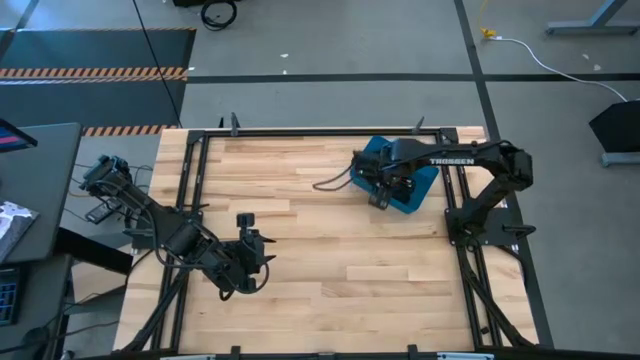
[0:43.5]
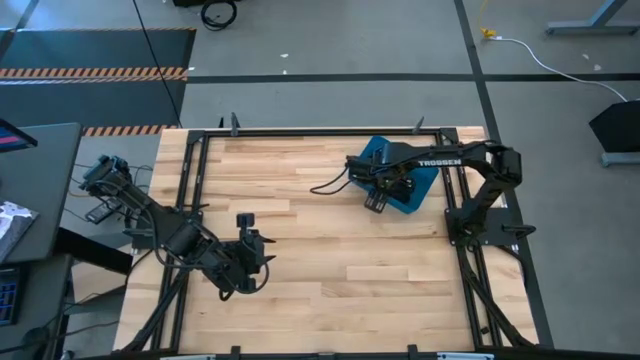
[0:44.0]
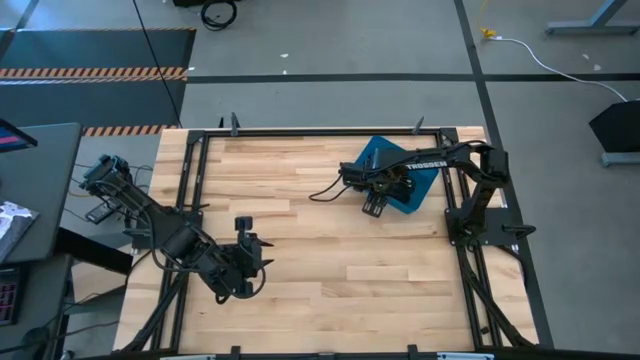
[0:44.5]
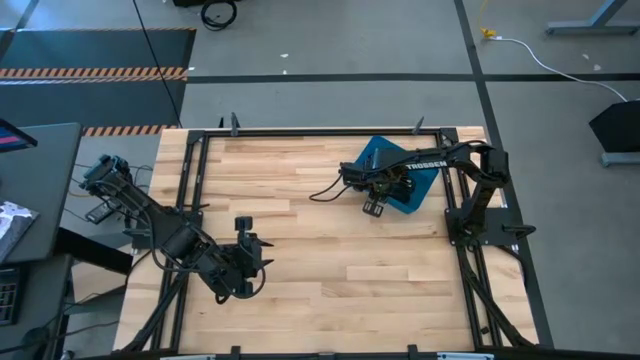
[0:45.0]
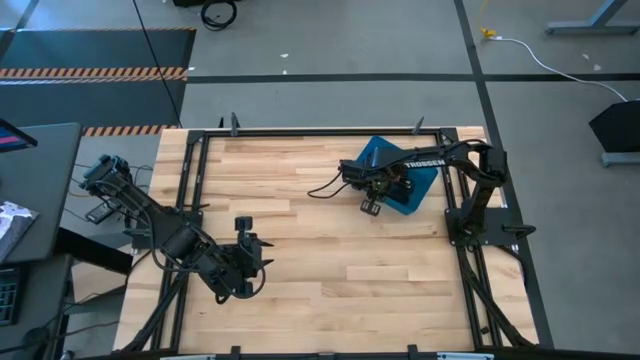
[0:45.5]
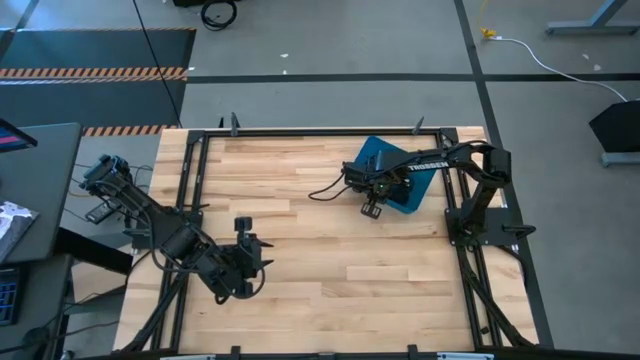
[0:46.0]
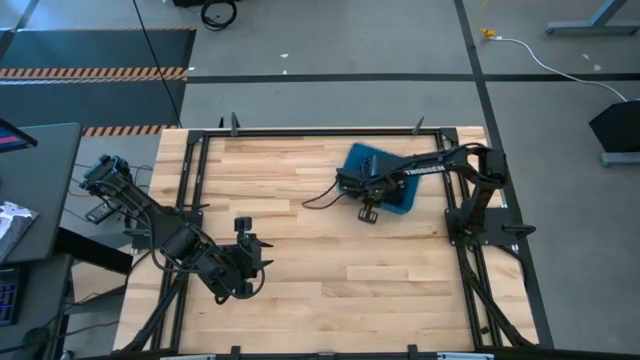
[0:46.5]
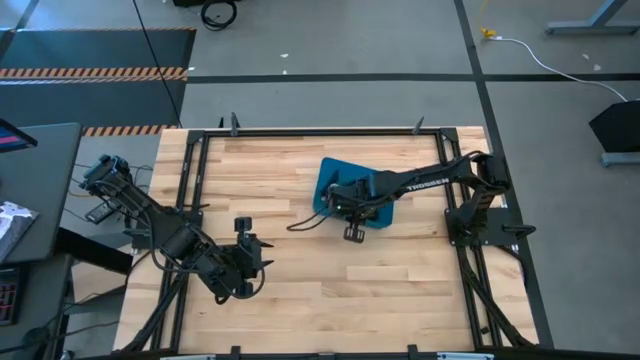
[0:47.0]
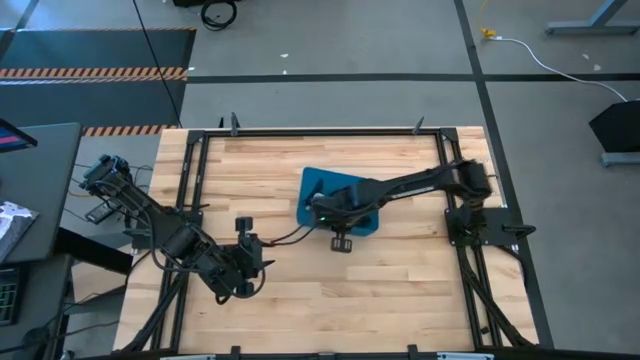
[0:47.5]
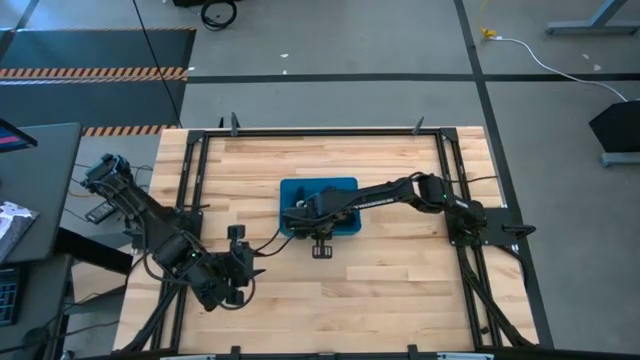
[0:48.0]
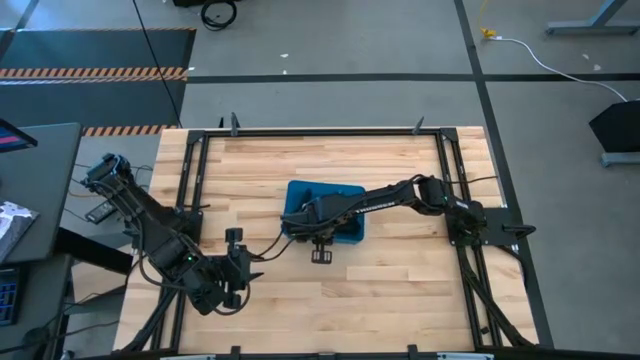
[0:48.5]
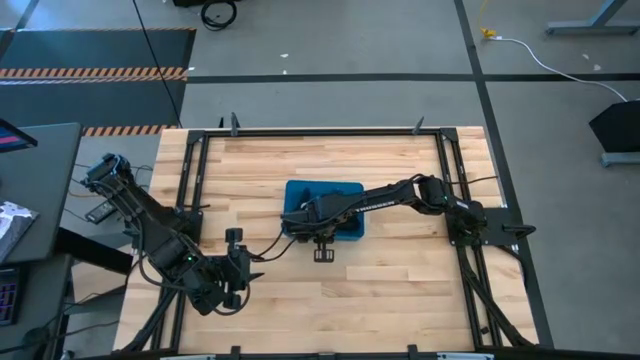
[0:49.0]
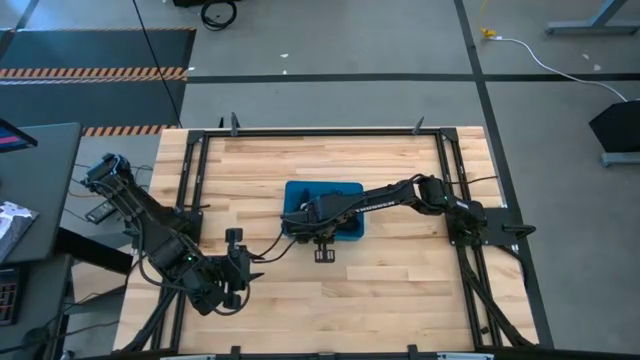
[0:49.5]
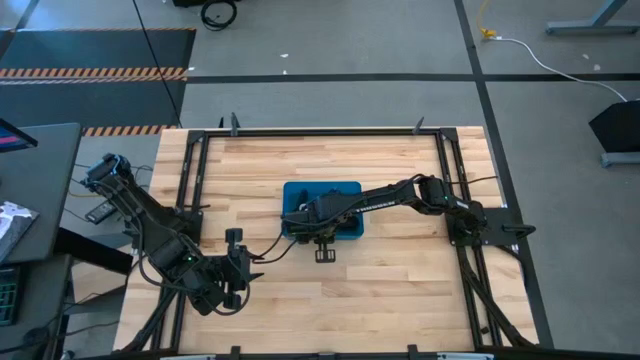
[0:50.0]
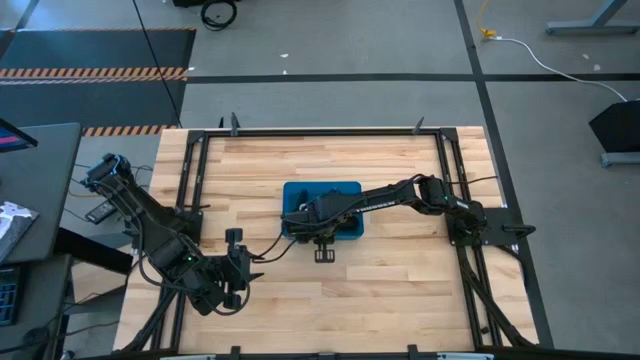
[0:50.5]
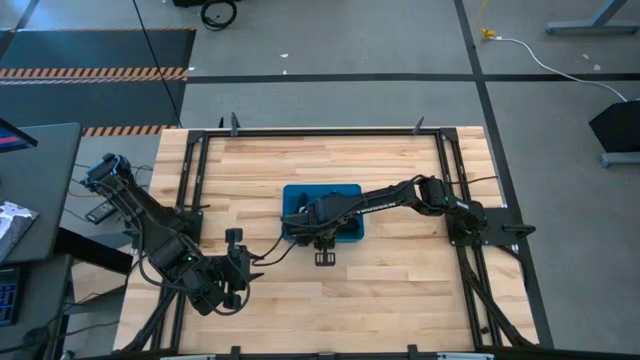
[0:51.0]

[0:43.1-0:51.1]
Task: Pick and place USB-C Cables
Move the blue bin to the center of the table

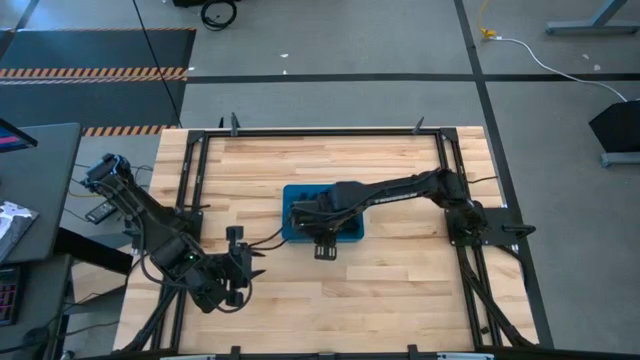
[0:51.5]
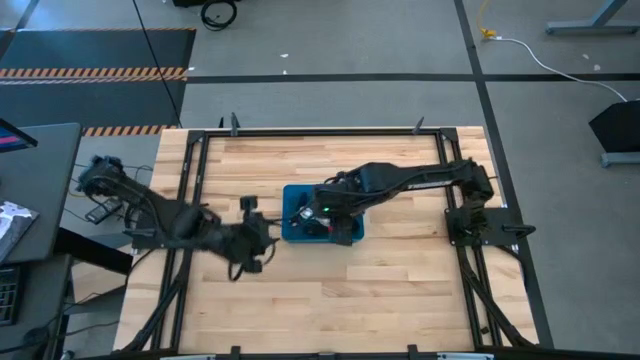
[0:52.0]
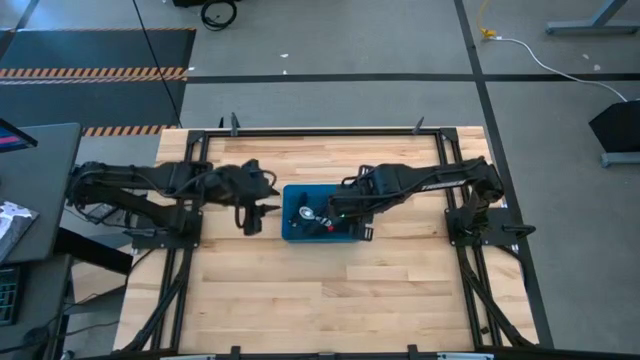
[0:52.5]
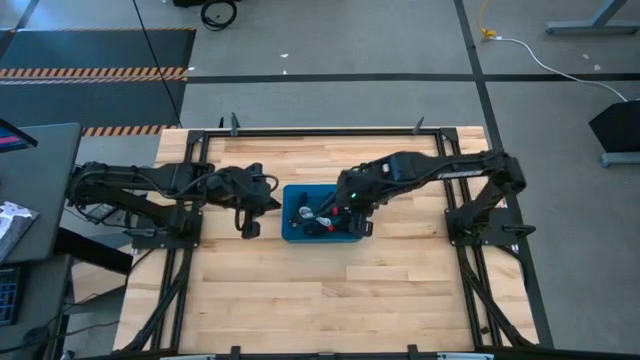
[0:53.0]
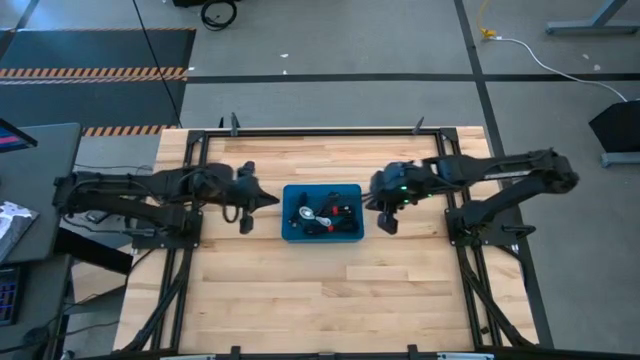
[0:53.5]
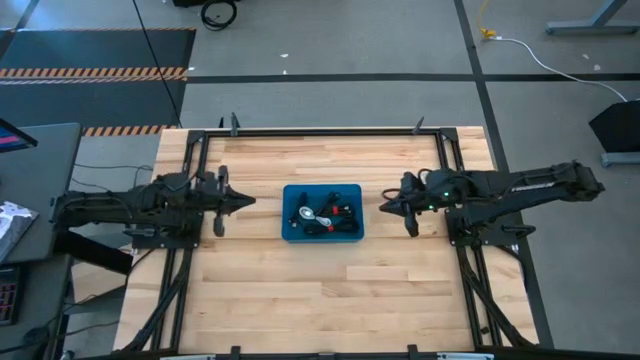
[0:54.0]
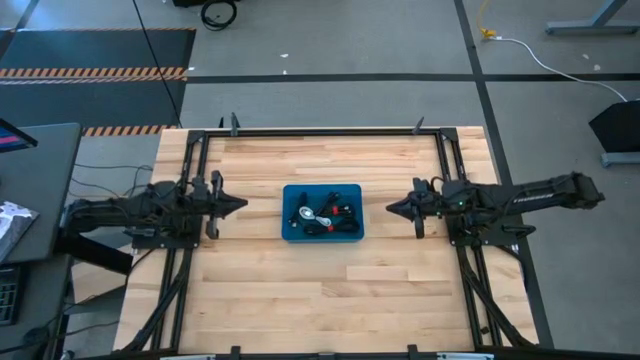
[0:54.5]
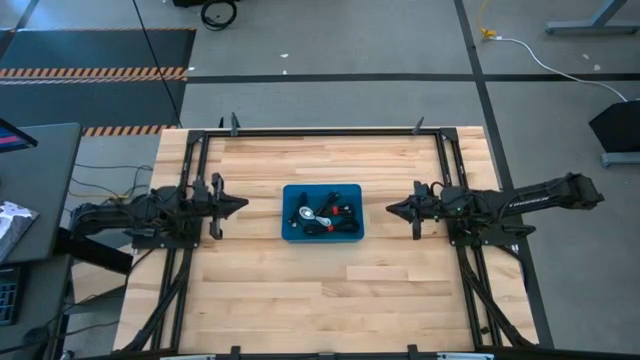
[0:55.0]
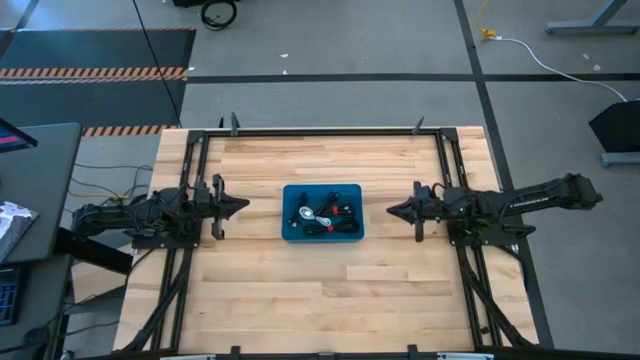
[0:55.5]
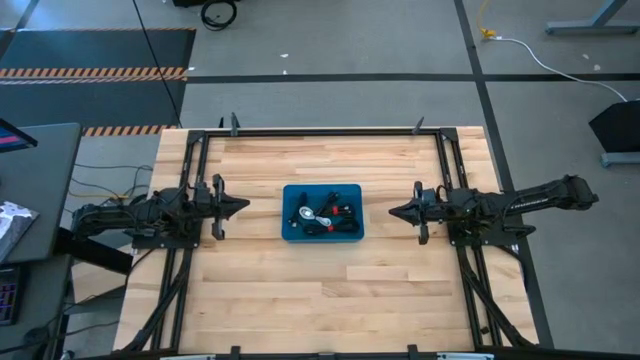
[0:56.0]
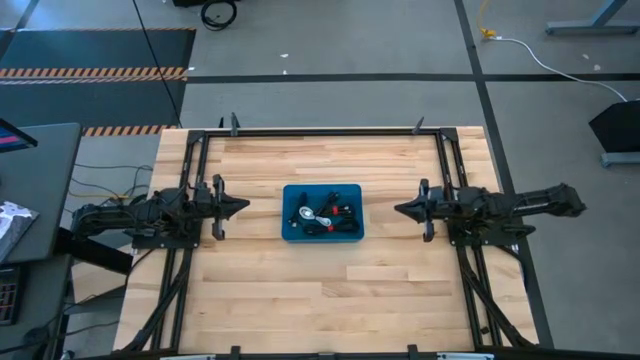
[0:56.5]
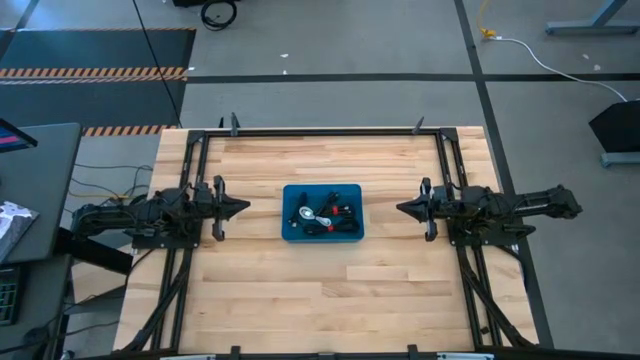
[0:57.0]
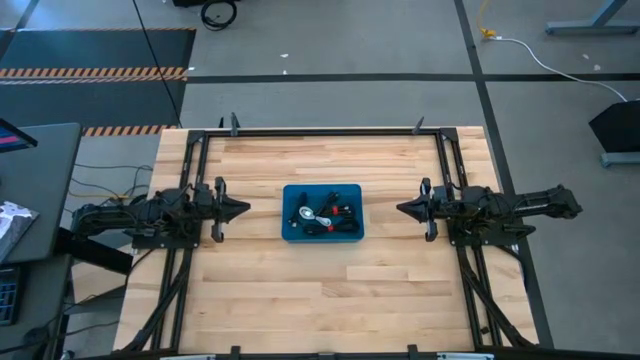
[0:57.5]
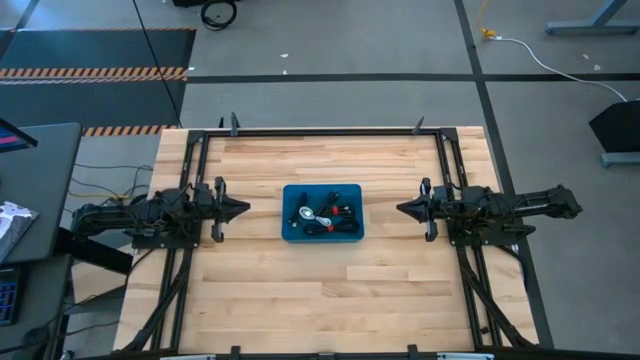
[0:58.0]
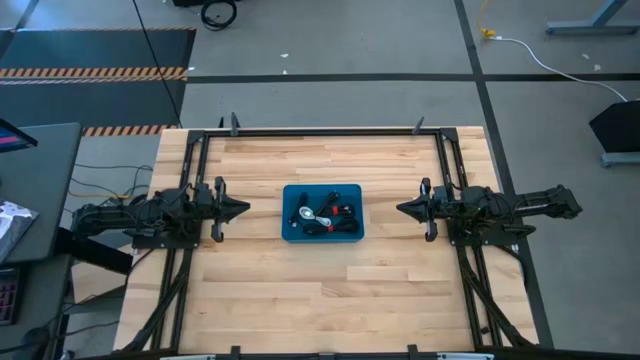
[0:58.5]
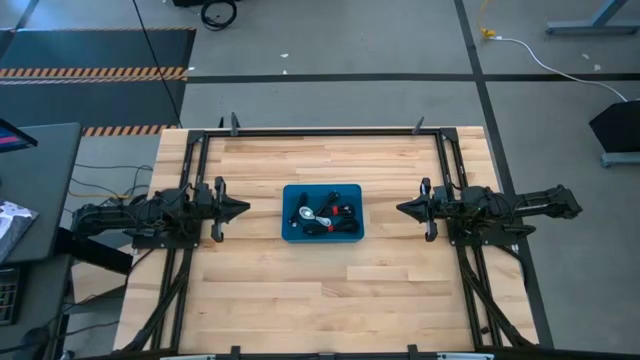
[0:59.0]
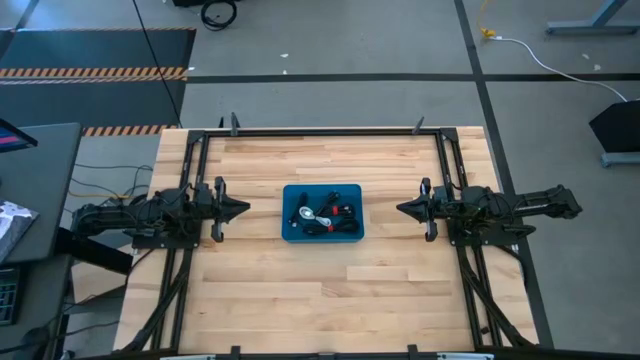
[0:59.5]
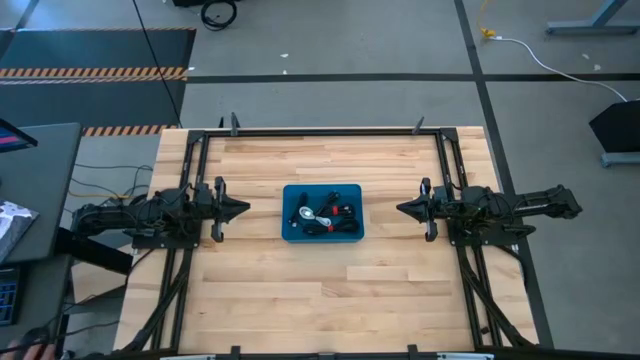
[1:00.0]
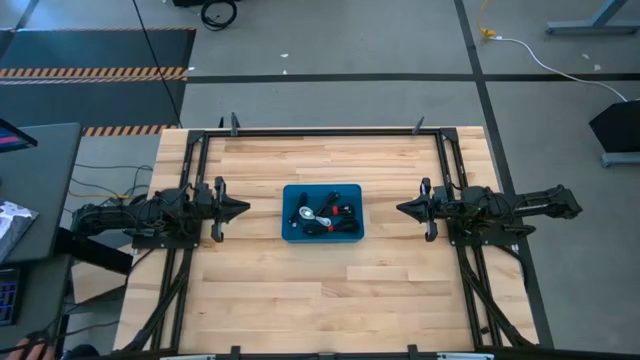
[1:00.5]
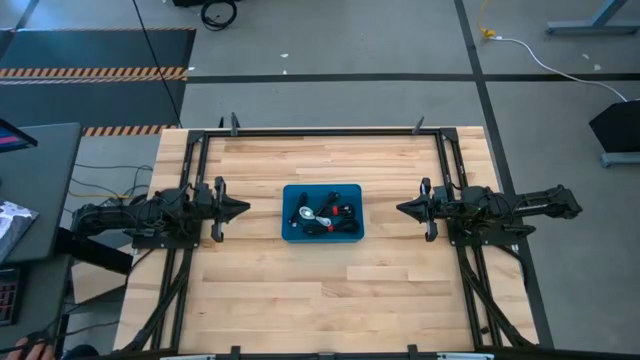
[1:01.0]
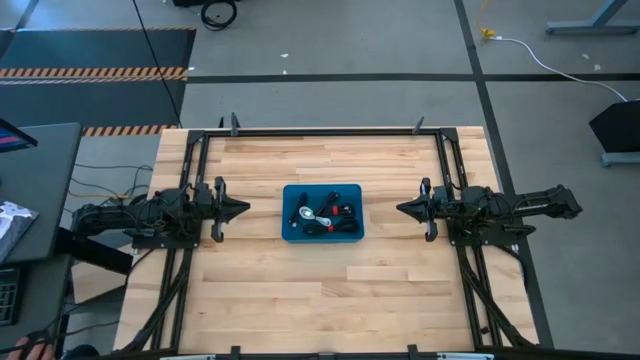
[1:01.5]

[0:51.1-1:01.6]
Return to Home Position

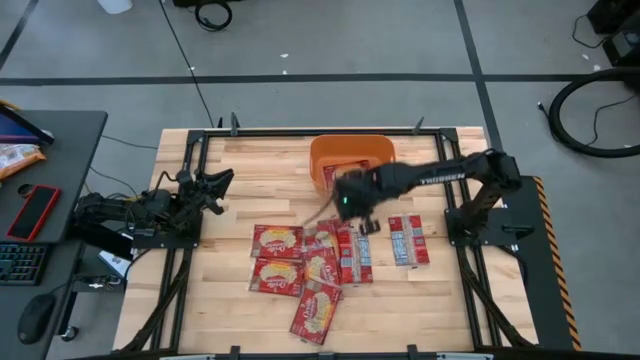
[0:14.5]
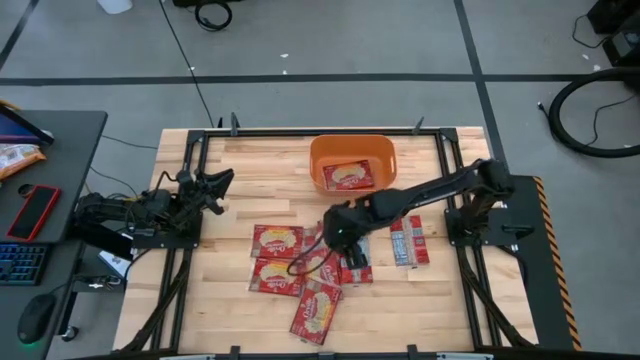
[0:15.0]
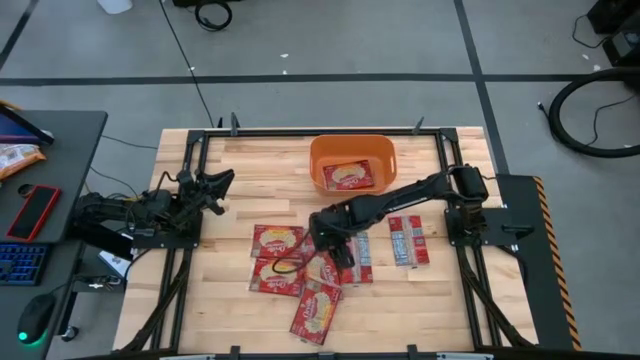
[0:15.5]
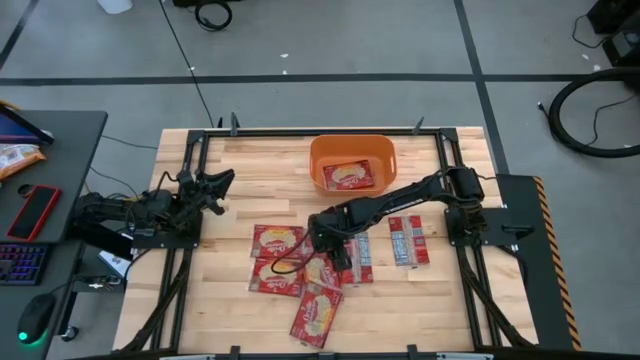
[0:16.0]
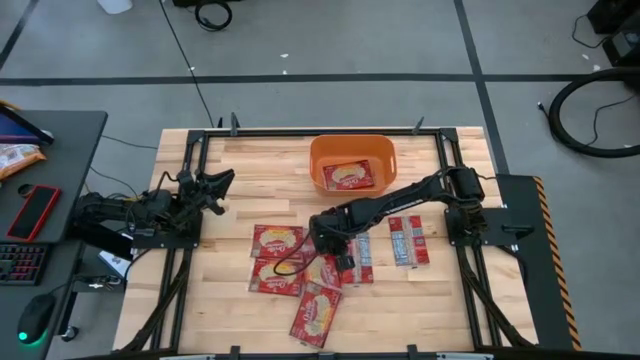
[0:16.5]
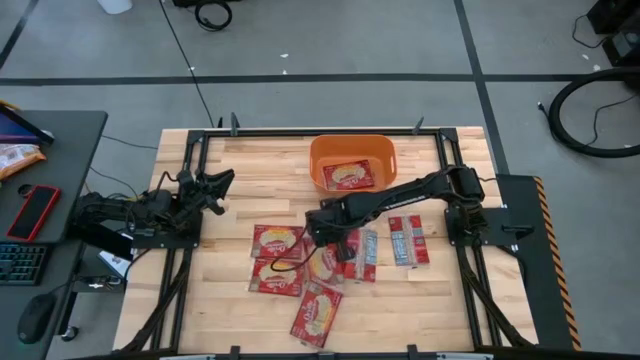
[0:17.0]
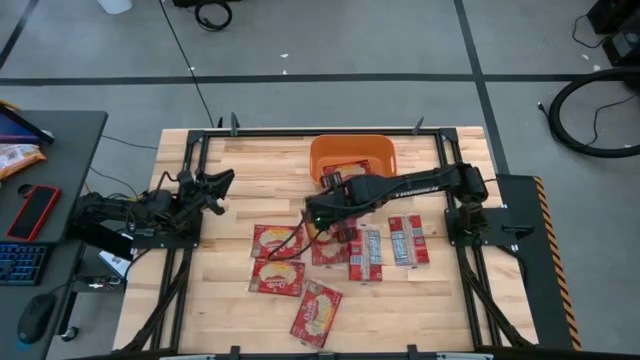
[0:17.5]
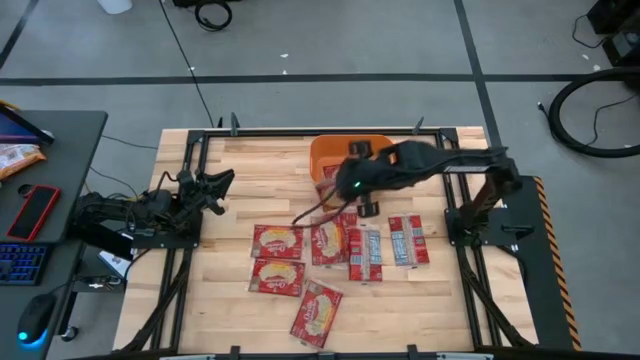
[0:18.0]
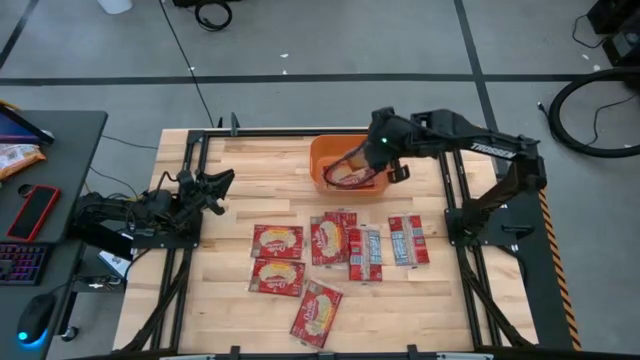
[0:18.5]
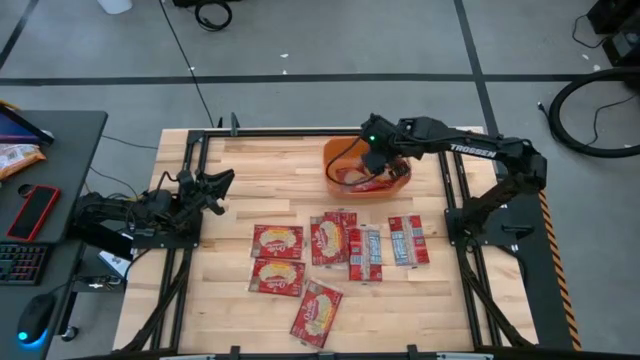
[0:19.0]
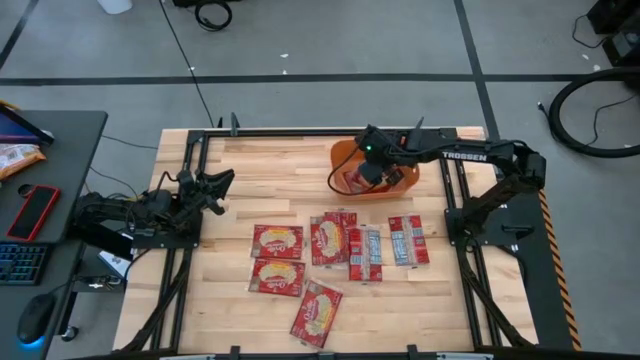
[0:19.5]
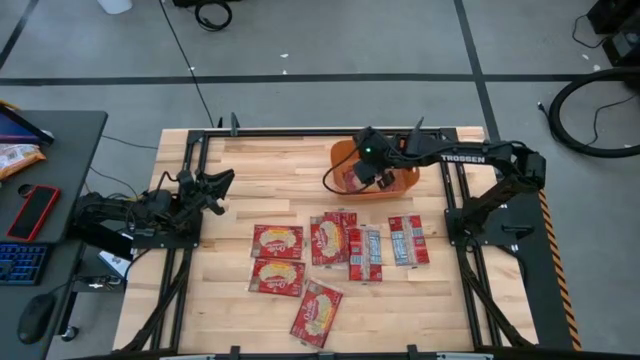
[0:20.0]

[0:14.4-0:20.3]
Task: Sort popcorn bags into baskets
Stack the popcorn bag on top of the other popcorn bag into the orange container
